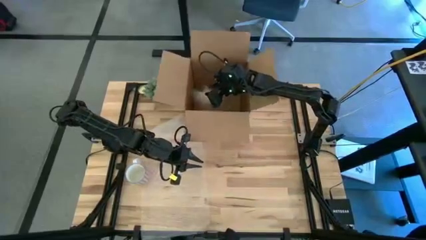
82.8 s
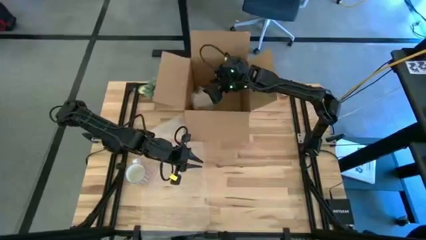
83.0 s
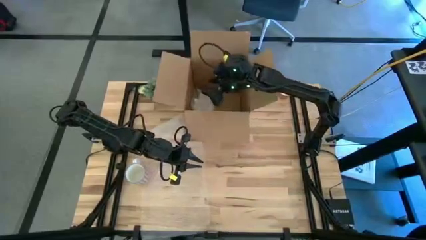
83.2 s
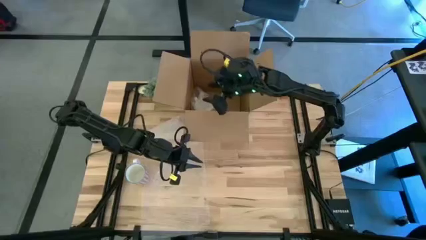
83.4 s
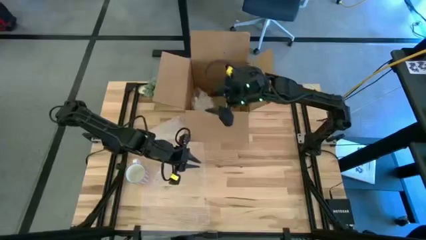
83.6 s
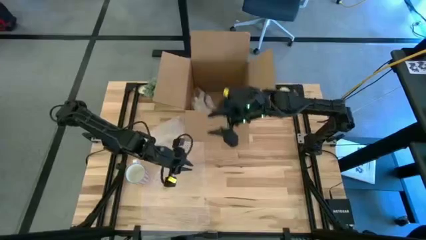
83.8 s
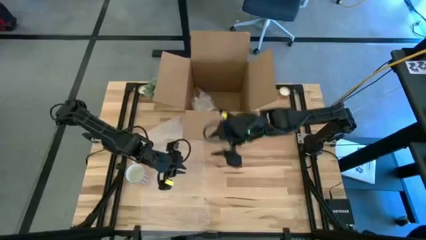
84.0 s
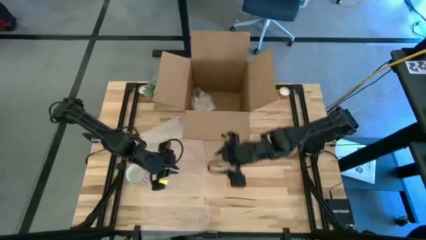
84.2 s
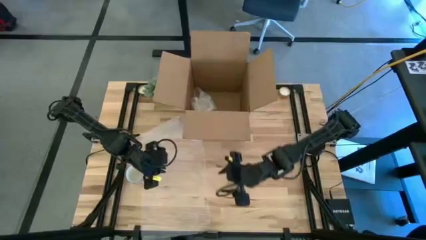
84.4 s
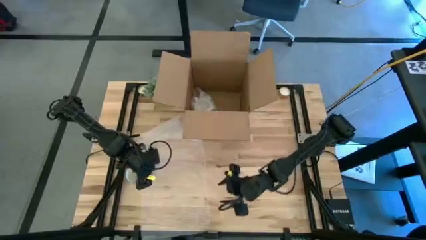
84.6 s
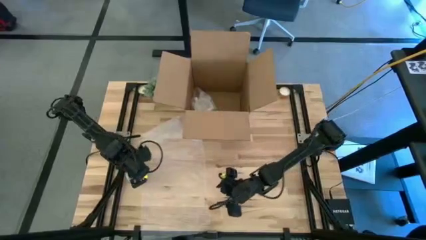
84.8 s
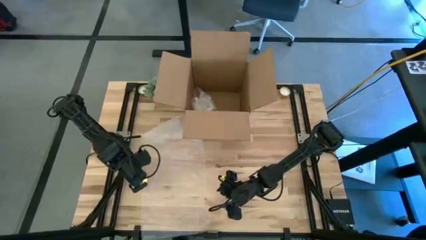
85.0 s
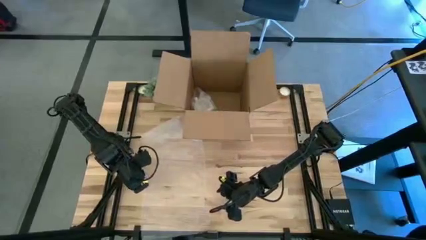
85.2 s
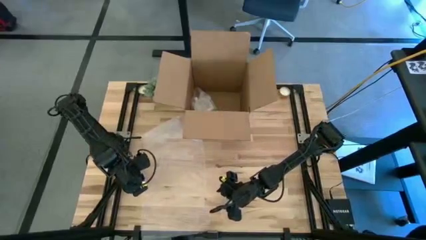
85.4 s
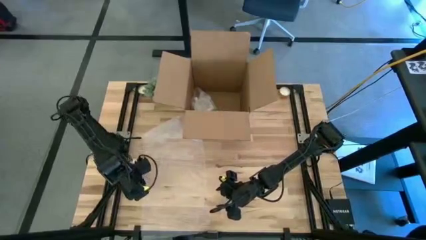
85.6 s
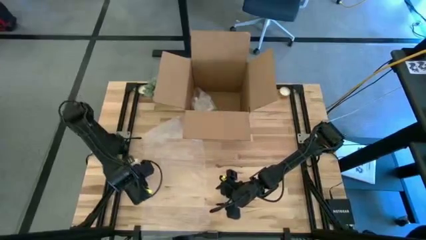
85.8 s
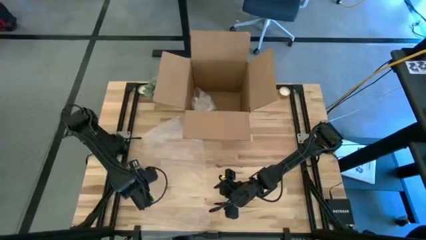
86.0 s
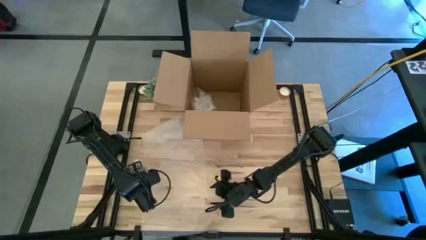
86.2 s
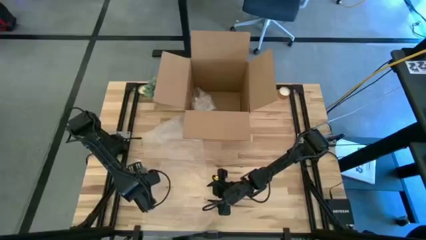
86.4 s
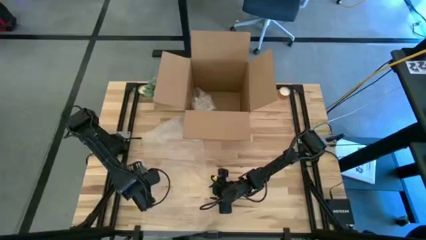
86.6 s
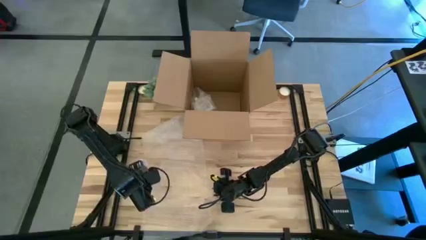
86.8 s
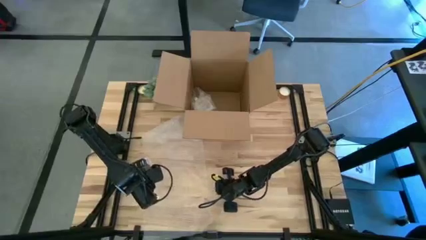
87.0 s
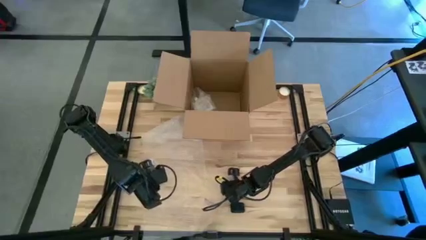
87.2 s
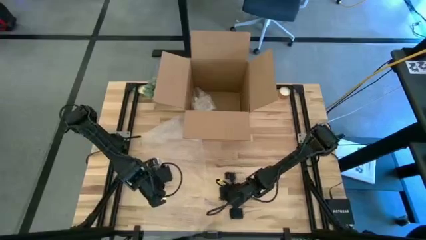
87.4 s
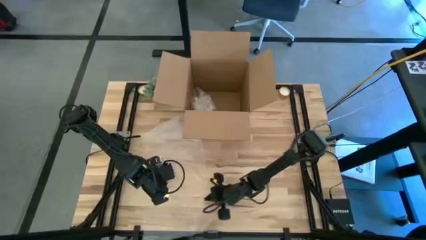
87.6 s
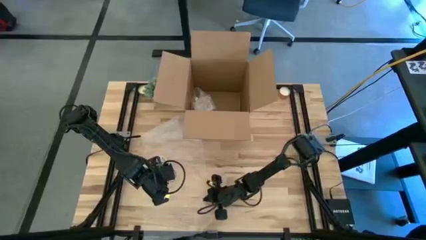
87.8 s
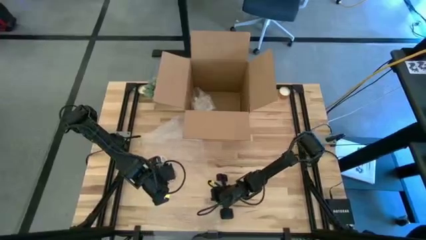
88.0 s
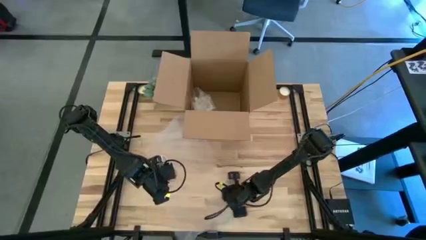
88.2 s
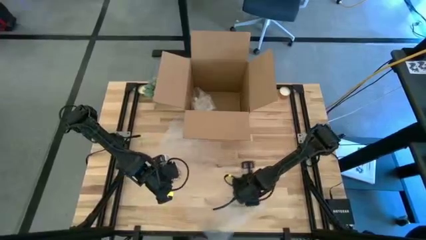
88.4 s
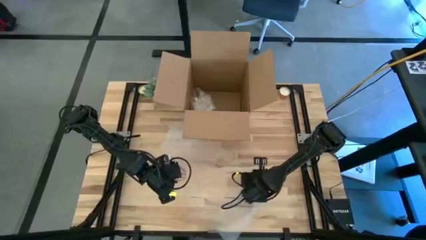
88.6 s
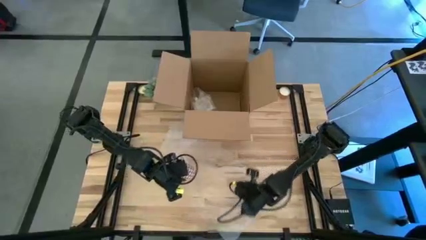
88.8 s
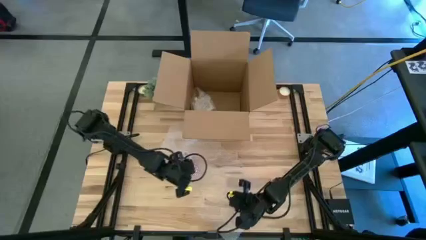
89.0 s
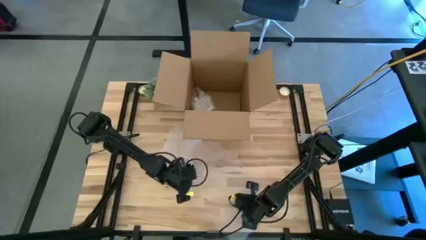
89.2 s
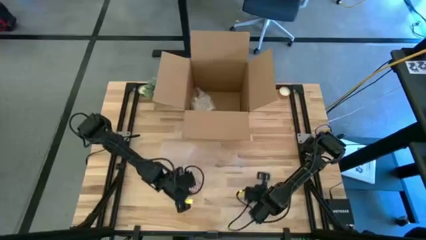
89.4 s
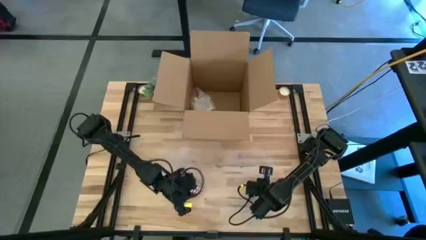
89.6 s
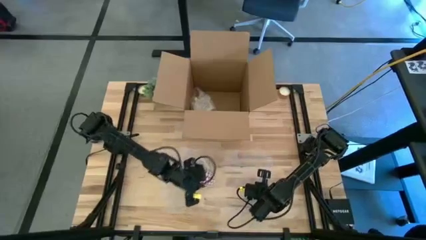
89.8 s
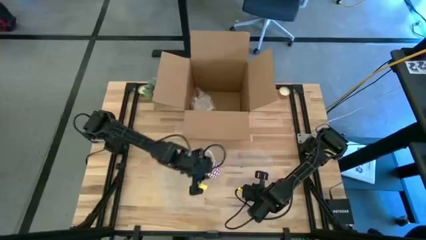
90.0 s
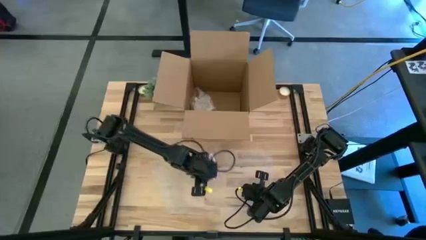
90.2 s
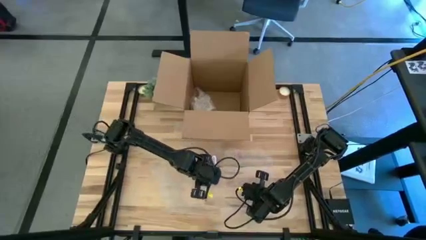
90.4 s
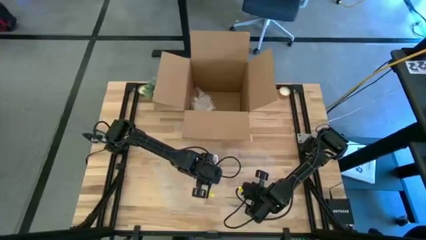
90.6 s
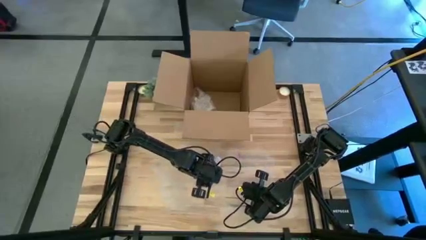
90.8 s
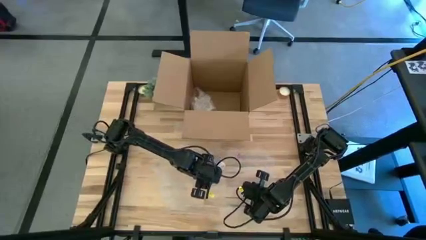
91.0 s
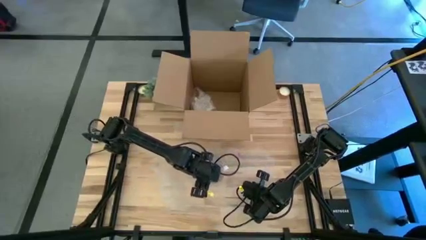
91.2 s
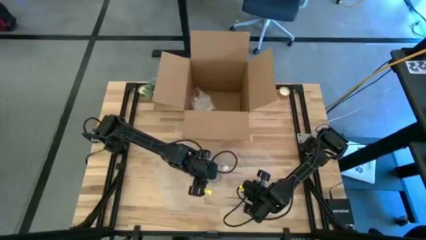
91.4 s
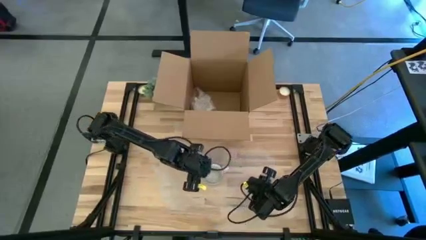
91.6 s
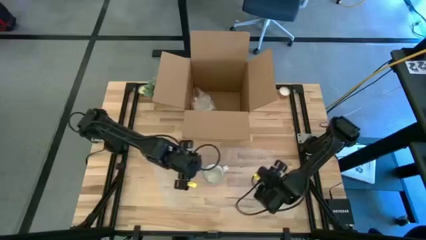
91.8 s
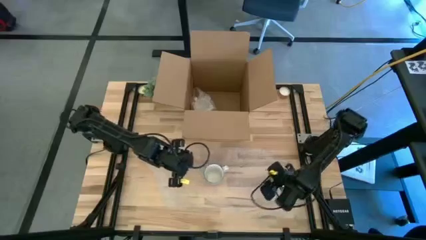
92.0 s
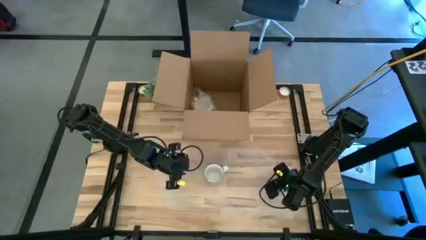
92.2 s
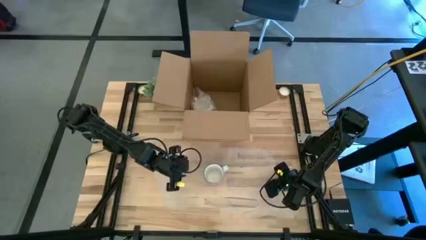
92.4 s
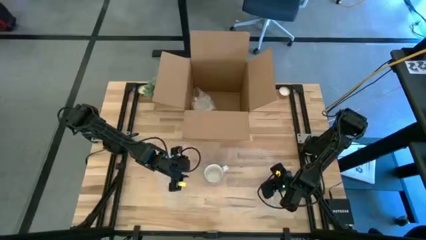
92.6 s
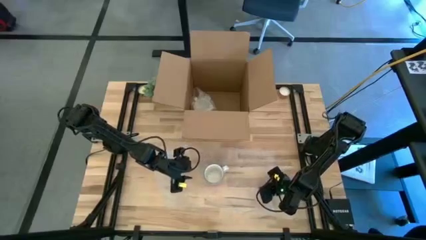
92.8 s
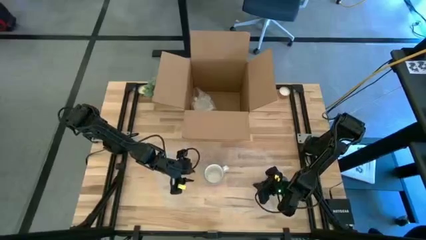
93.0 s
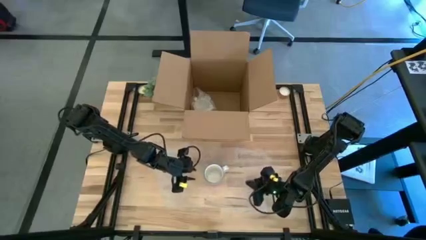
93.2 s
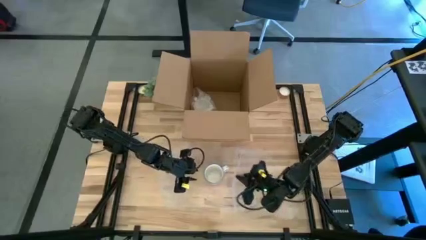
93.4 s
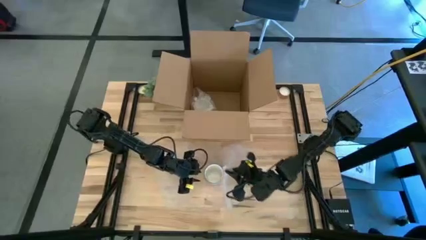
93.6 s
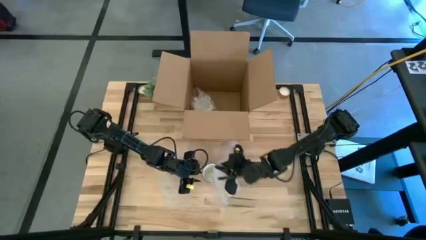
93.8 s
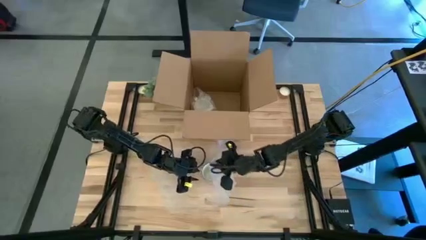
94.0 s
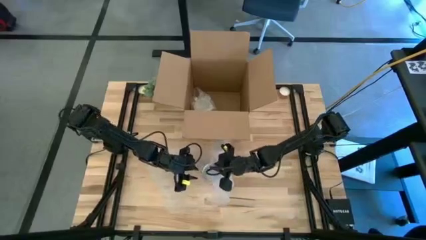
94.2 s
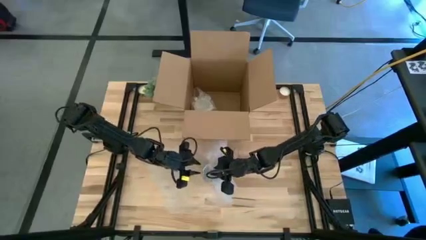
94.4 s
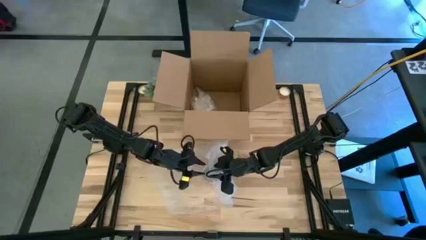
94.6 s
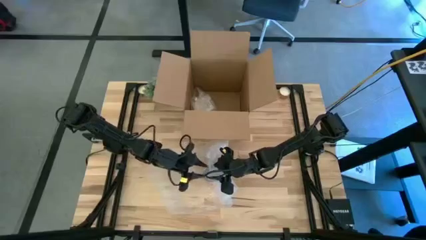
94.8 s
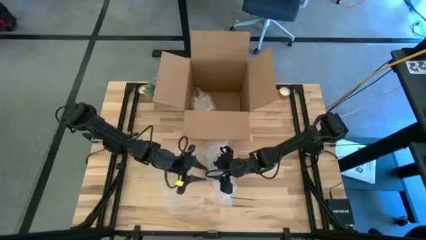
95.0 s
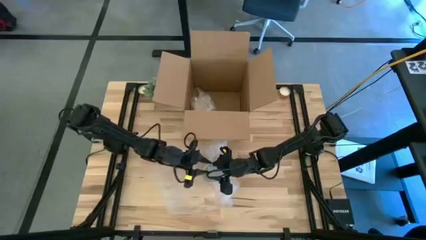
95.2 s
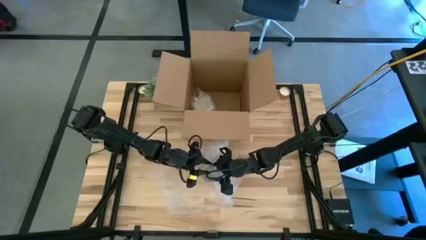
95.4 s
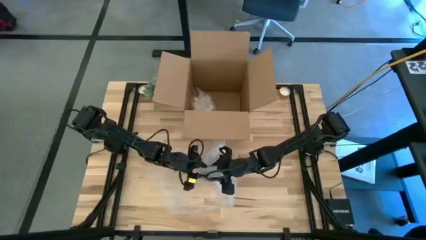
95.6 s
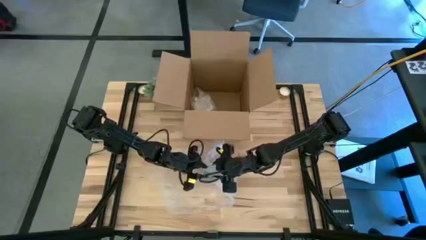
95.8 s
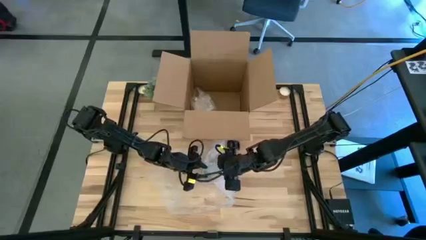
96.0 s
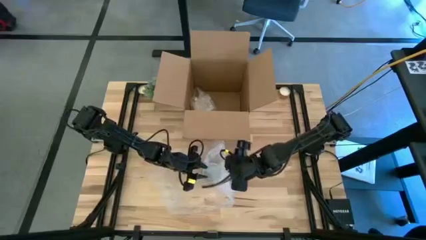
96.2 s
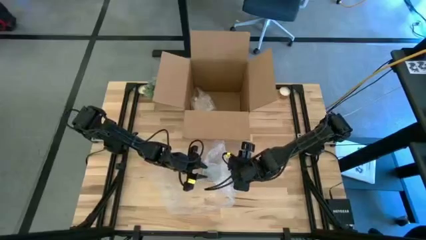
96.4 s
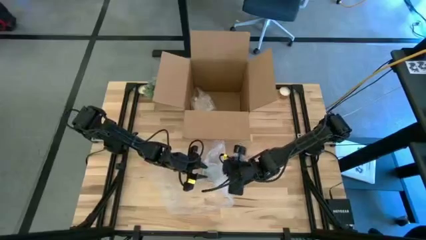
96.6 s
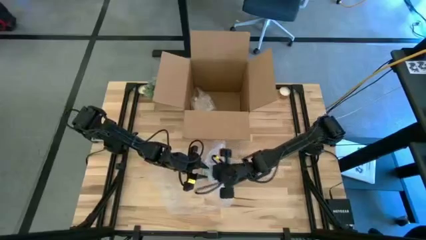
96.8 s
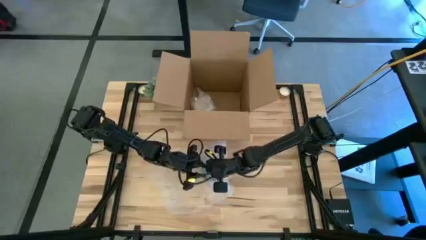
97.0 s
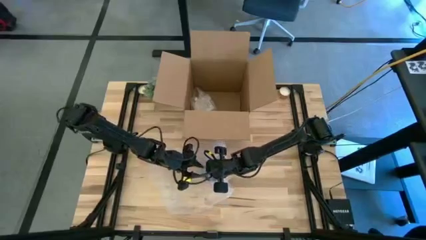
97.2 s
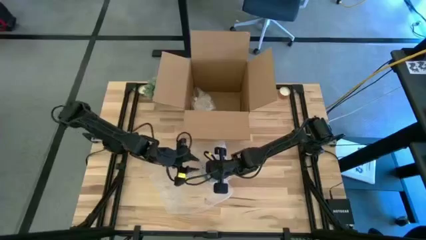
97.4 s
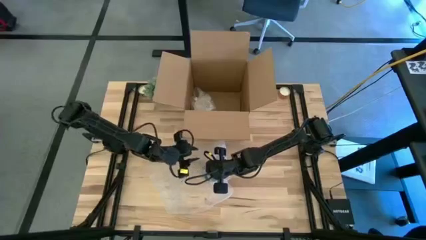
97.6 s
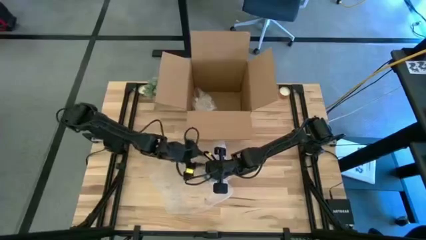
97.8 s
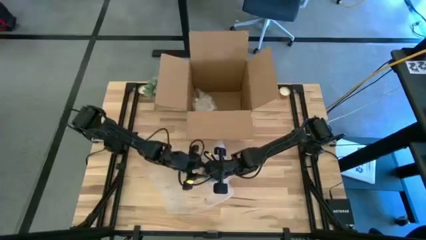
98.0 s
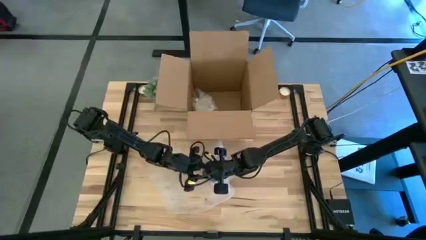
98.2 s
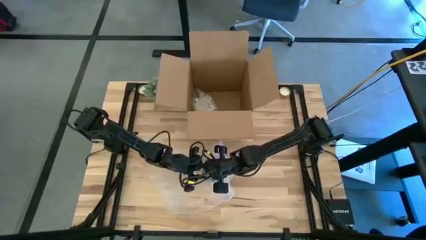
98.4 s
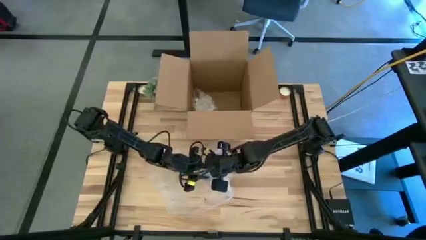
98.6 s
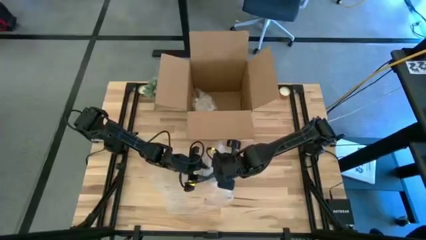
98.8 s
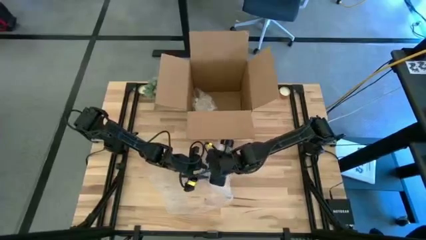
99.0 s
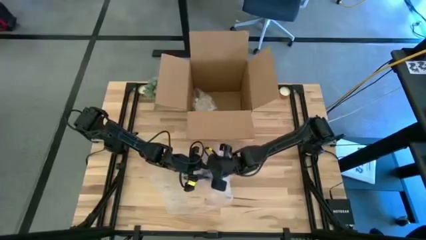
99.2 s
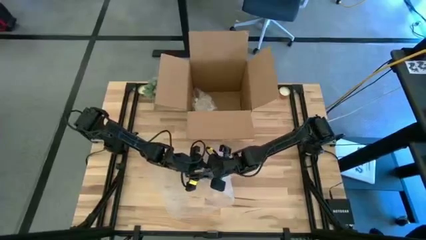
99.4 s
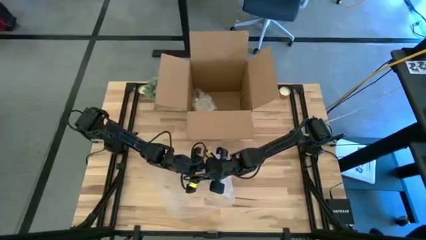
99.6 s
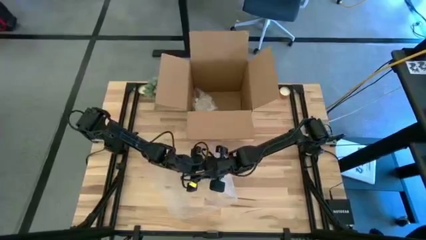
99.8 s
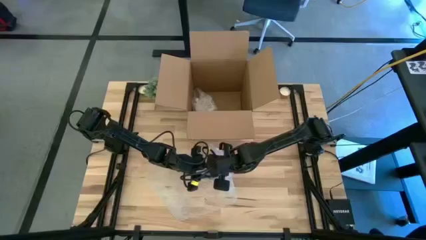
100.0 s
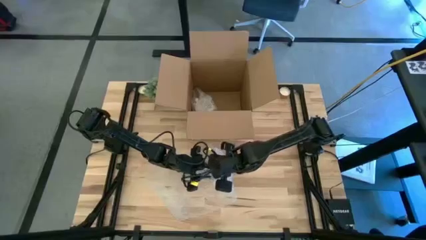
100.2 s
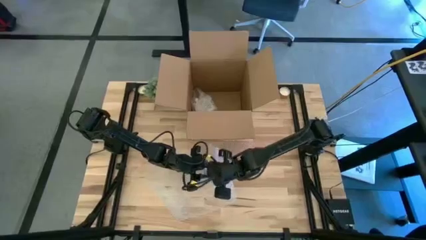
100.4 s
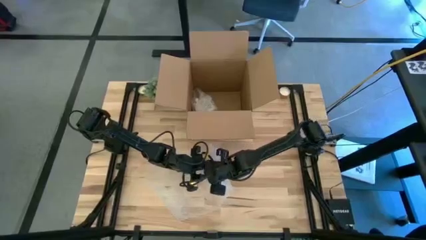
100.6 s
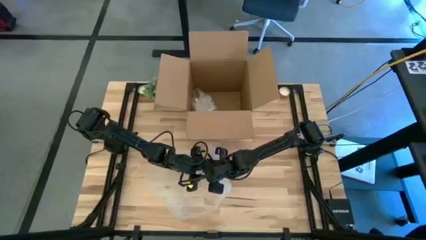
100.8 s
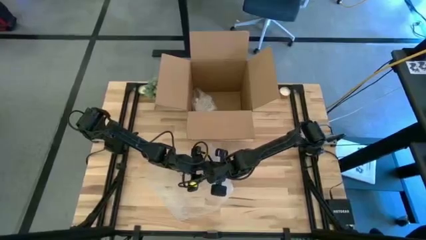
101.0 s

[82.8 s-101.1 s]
Task: wrap mug
Wrap the red mug with the bubble wrap
